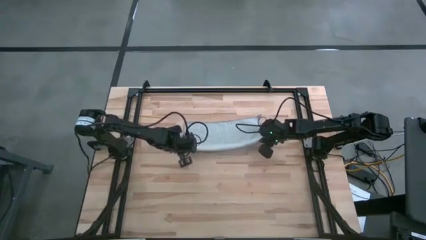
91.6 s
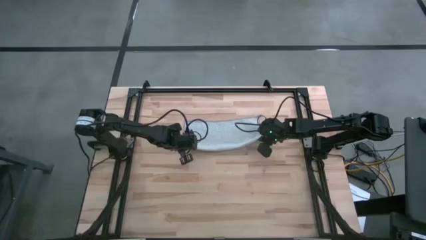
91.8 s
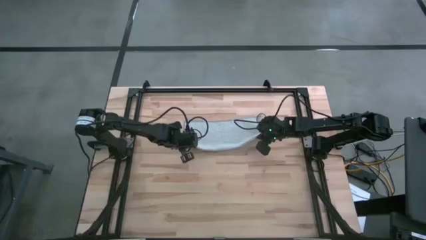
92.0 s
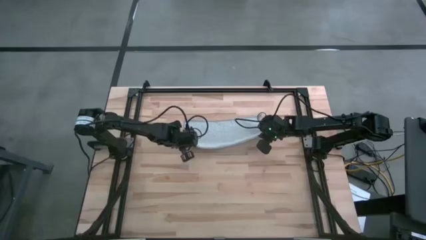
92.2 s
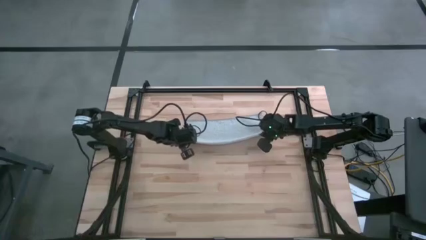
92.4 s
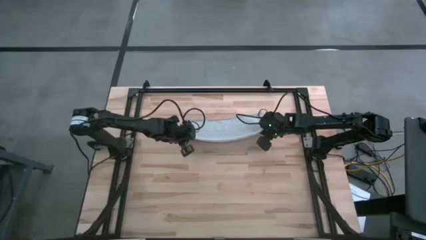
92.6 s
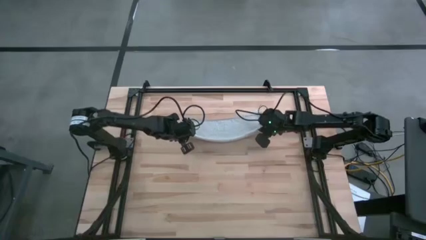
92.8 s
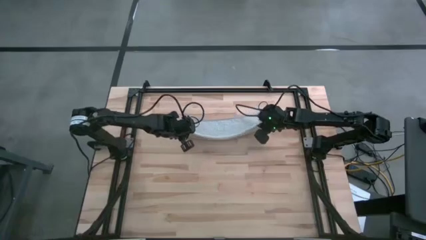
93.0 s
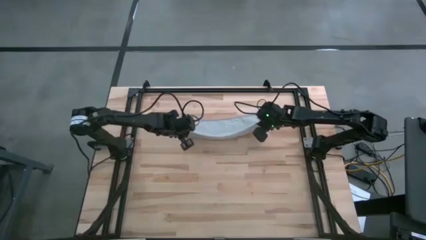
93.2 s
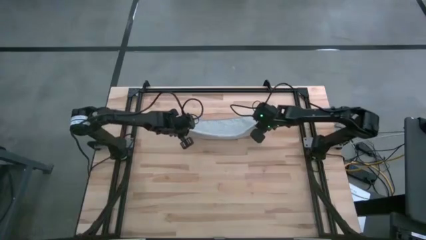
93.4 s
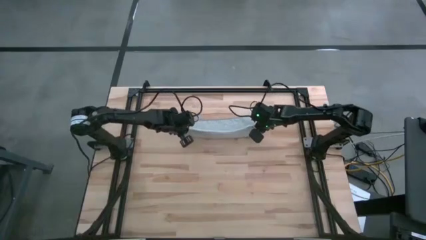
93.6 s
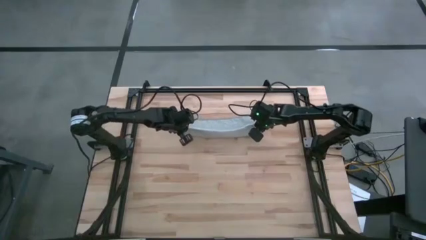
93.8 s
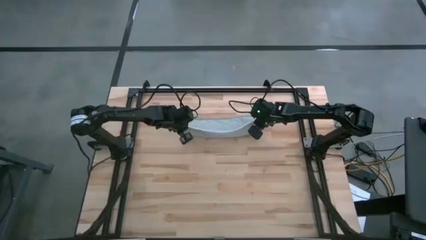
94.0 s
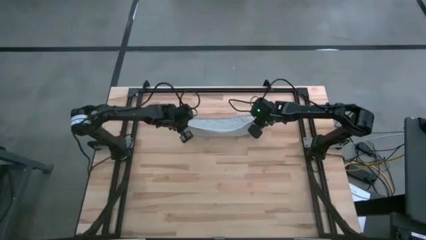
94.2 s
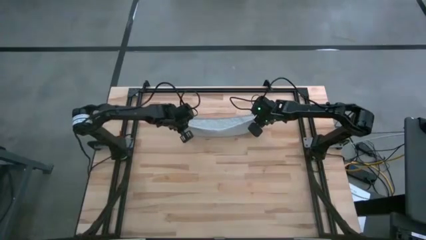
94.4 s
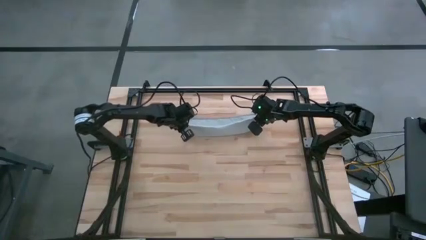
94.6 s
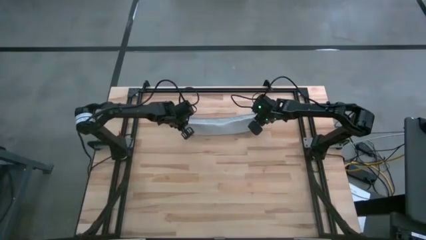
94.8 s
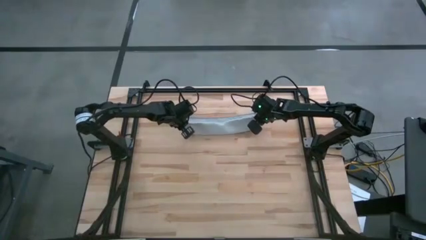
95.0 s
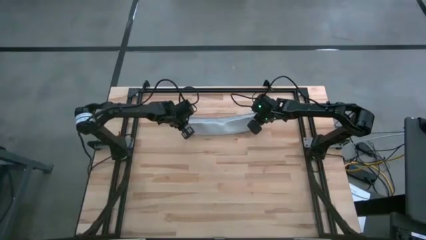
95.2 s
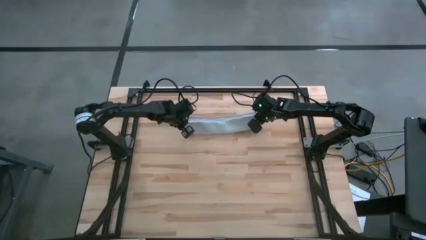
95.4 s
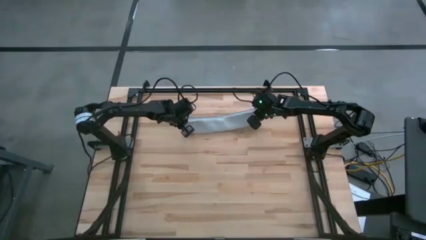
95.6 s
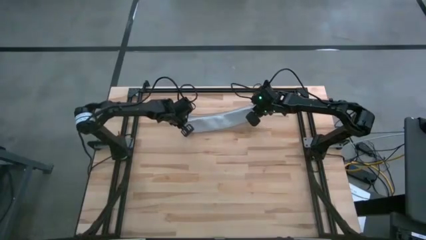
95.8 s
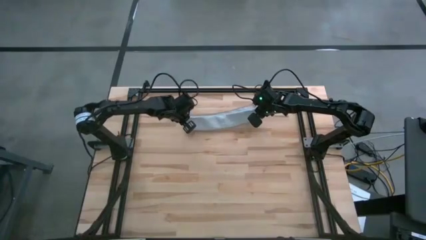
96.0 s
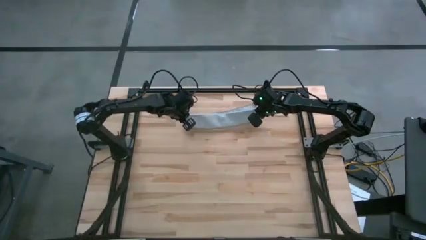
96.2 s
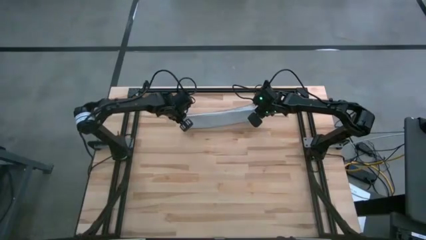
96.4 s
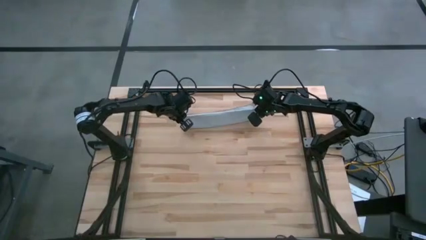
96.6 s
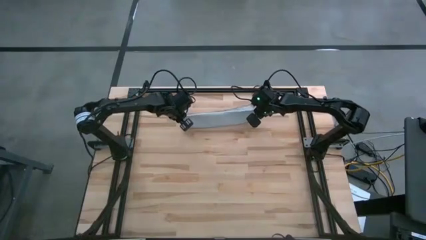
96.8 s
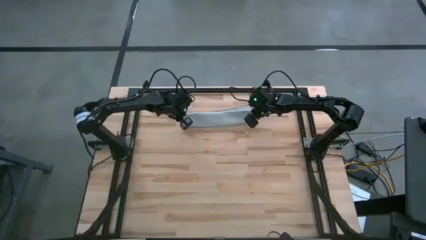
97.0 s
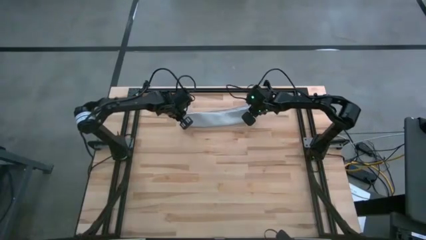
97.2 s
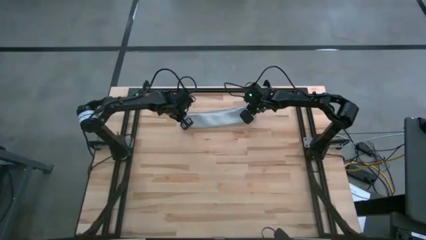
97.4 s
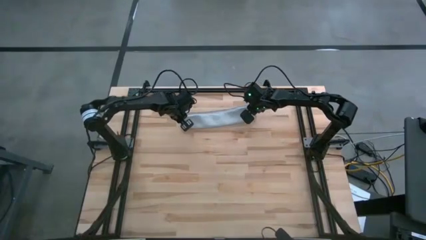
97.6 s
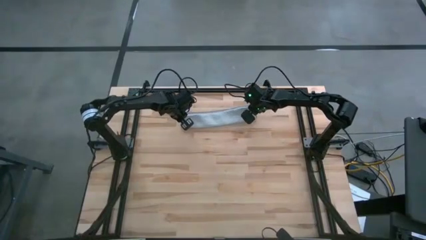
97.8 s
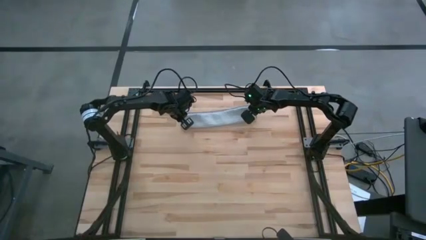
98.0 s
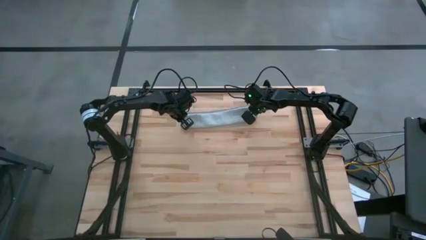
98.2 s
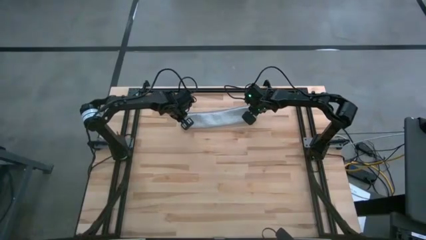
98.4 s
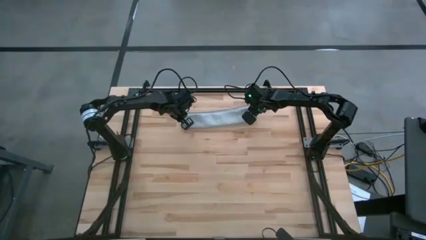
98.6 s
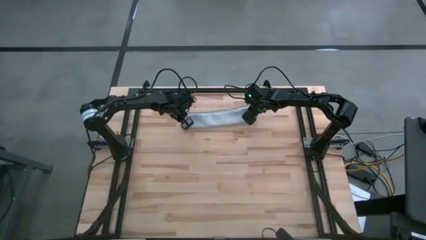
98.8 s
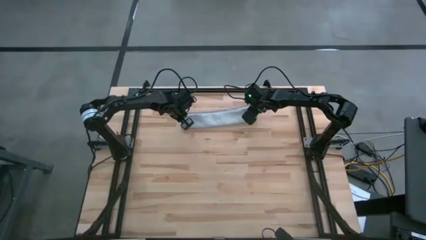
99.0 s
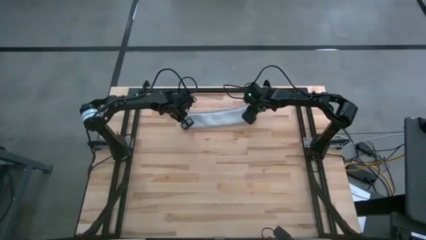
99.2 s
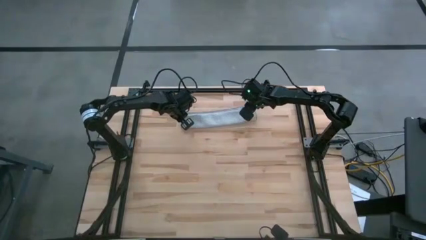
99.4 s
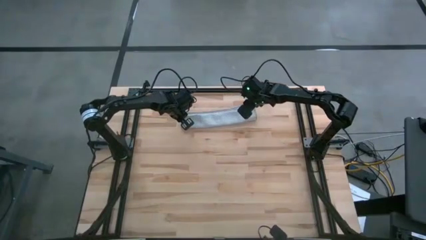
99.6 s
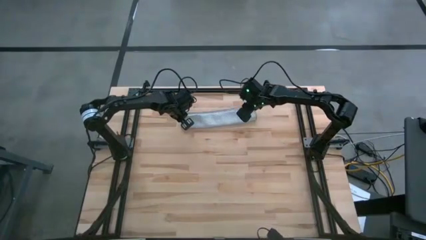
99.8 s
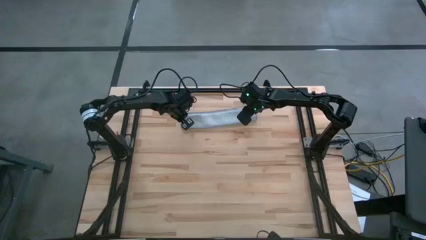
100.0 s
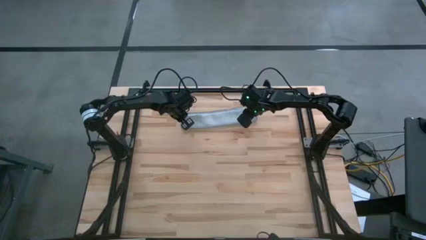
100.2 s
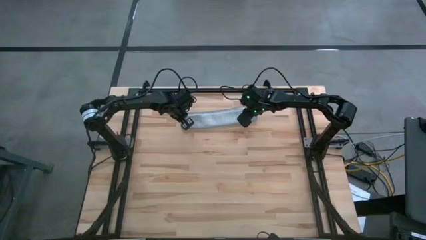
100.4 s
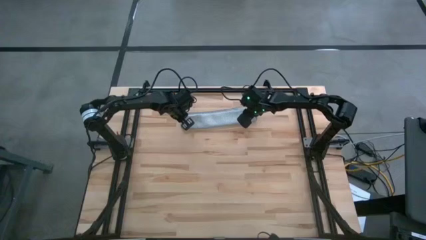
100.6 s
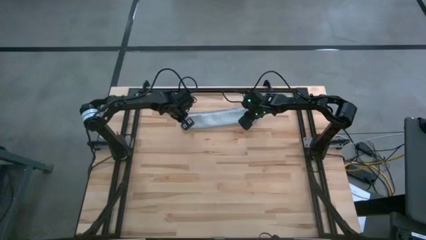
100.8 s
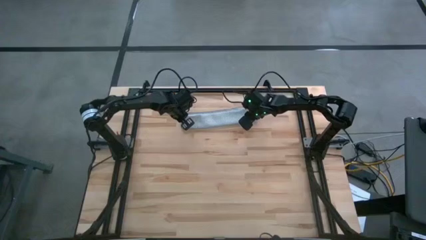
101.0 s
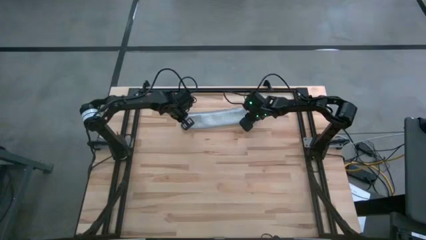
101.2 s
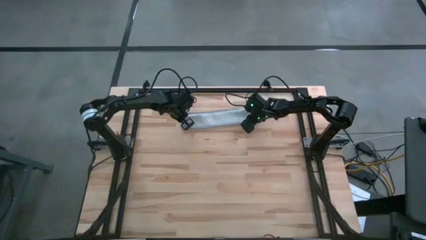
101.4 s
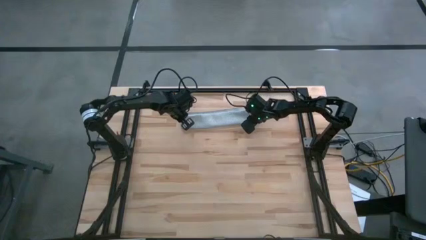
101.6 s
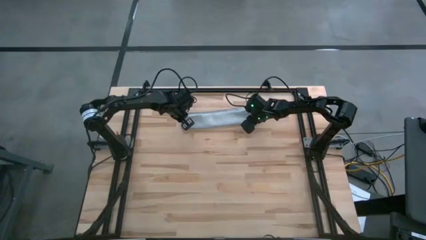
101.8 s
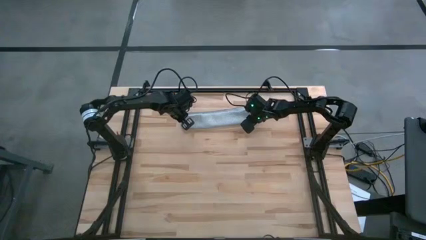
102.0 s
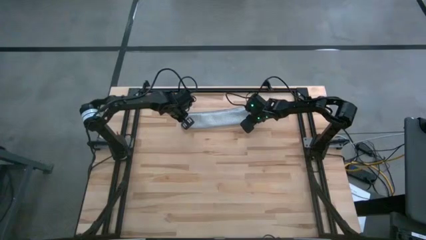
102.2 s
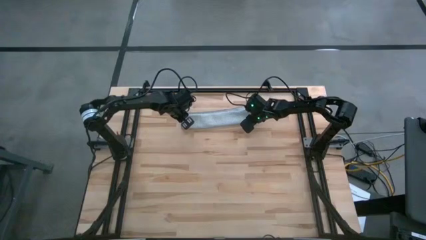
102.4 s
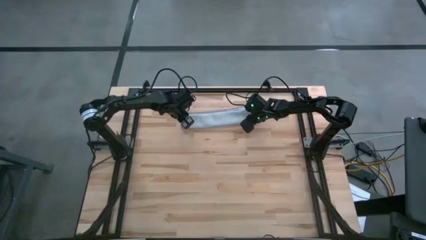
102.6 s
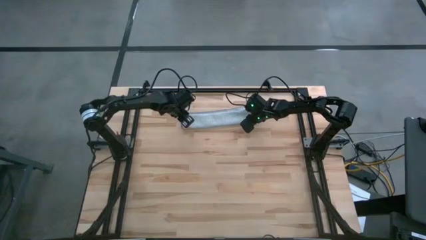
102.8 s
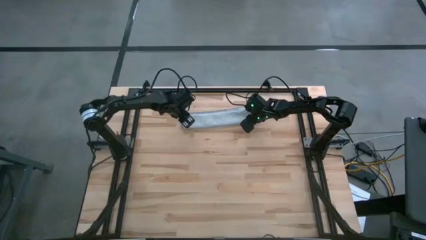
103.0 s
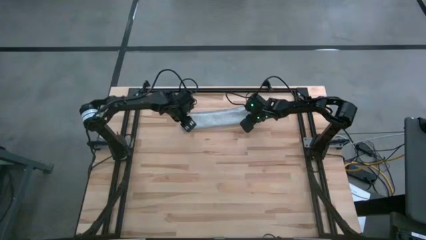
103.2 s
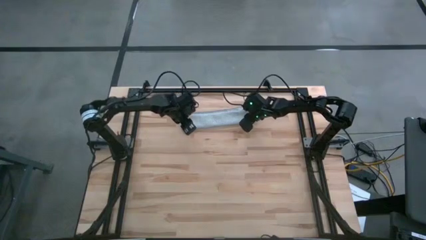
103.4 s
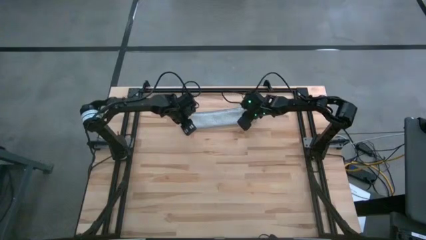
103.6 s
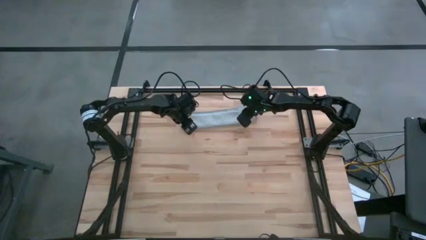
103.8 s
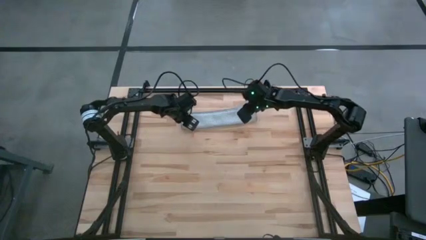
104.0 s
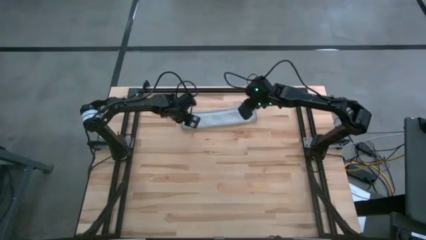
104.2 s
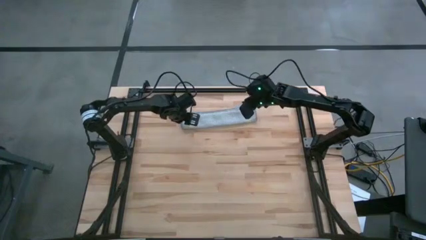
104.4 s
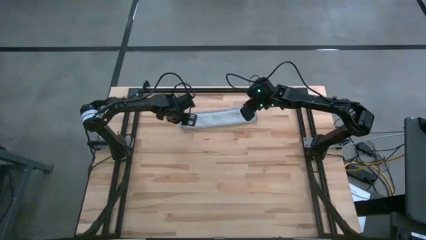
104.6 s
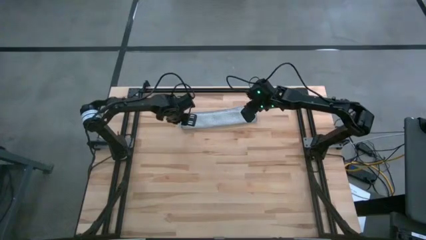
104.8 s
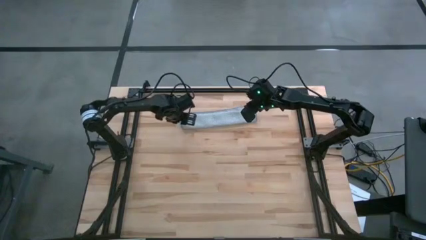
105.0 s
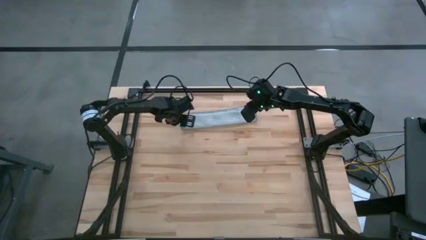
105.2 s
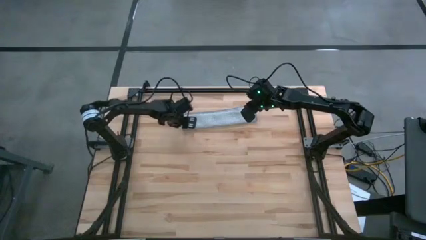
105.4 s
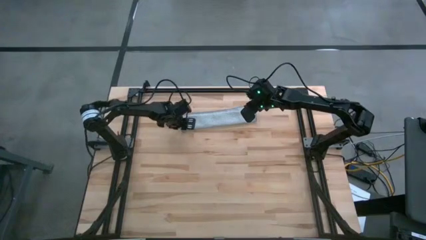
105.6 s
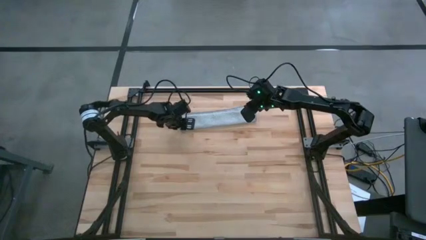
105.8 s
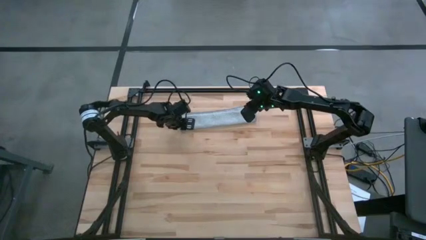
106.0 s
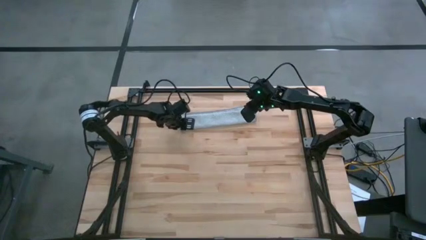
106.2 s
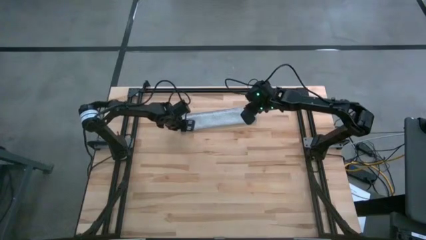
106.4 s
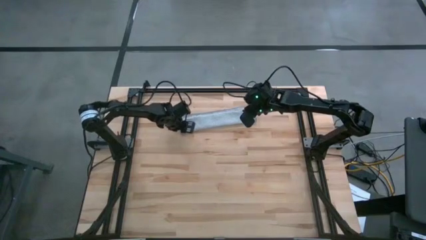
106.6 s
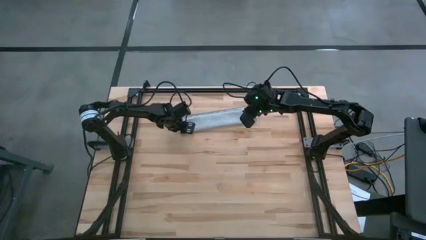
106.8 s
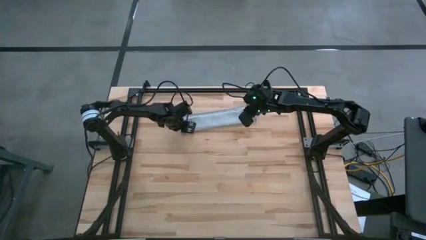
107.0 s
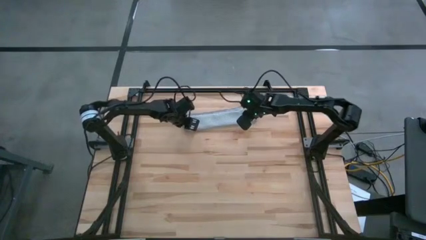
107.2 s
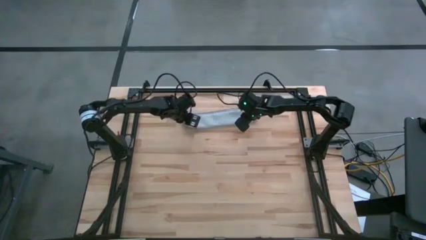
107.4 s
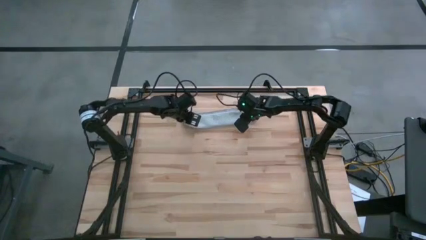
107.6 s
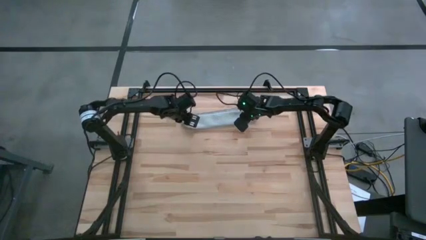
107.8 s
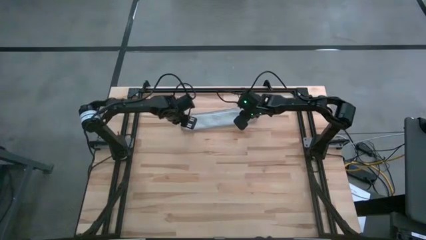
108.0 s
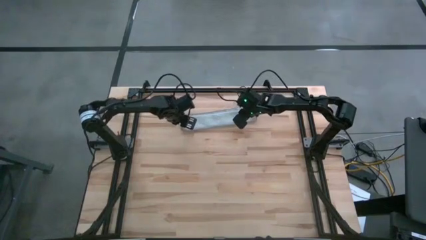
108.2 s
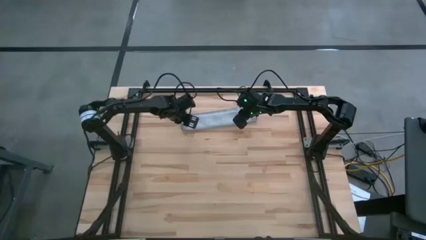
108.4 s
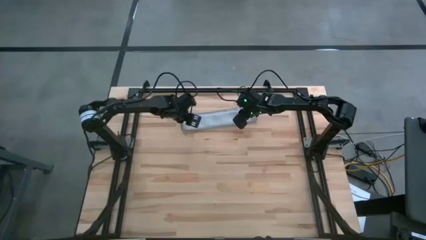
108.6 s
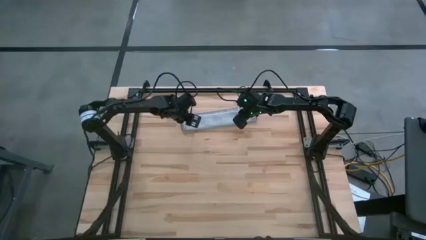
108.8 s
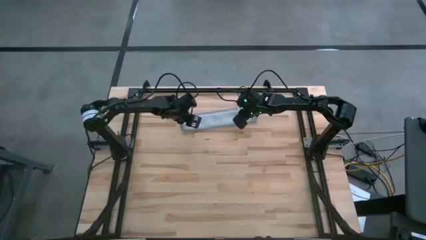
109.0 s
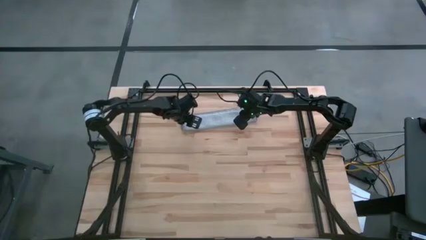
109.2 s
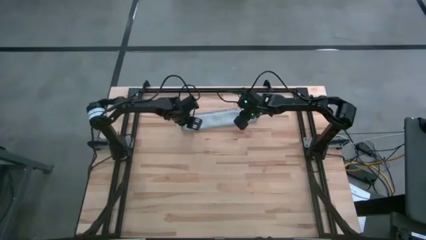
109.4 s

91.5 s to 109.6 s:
Task: Fold microfiber towels
Fold the gray on the table
